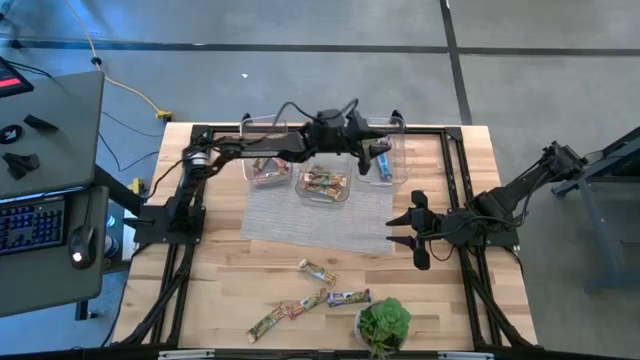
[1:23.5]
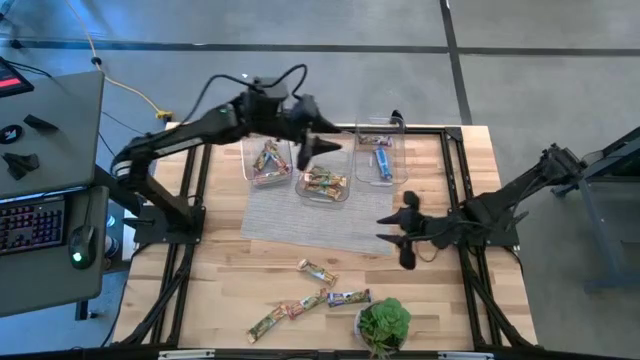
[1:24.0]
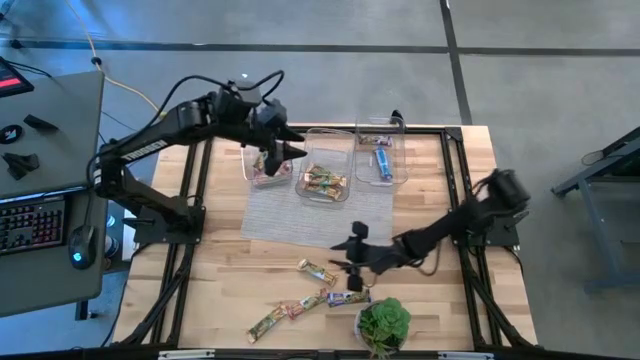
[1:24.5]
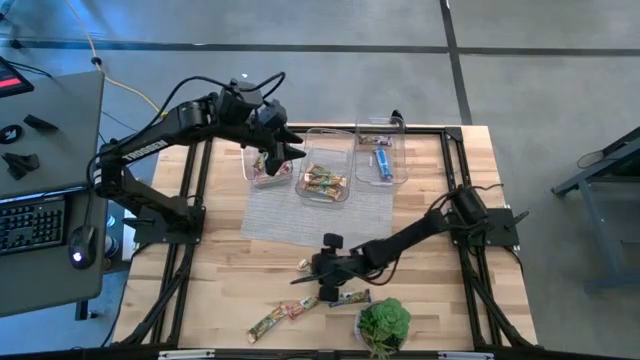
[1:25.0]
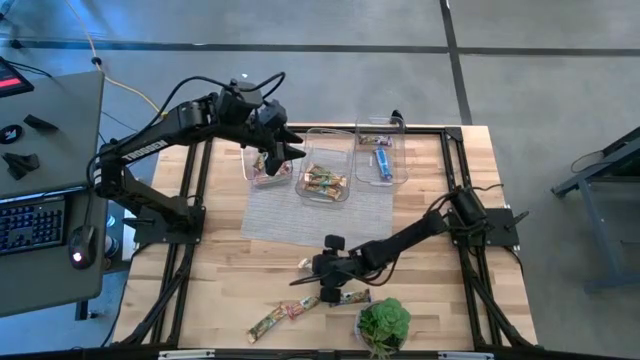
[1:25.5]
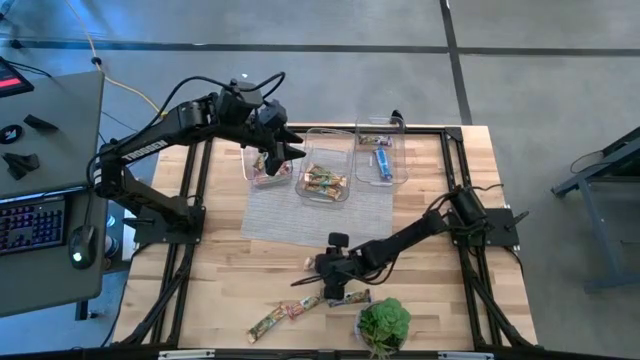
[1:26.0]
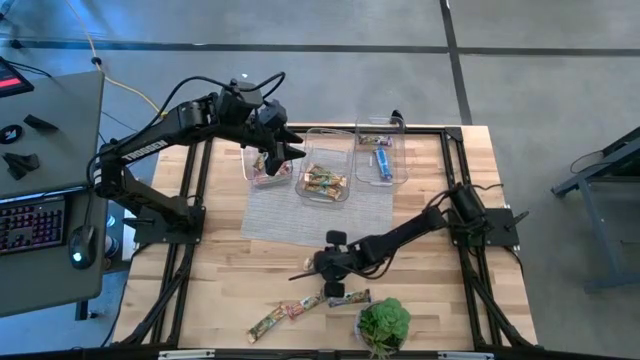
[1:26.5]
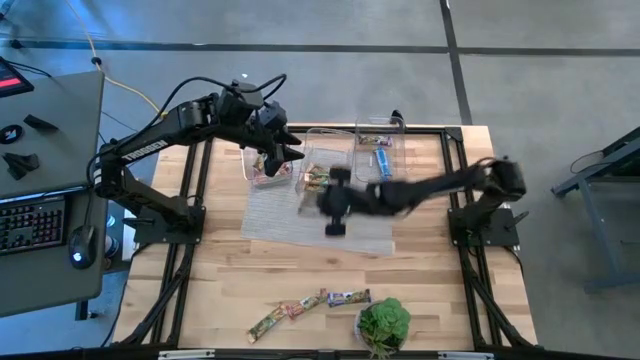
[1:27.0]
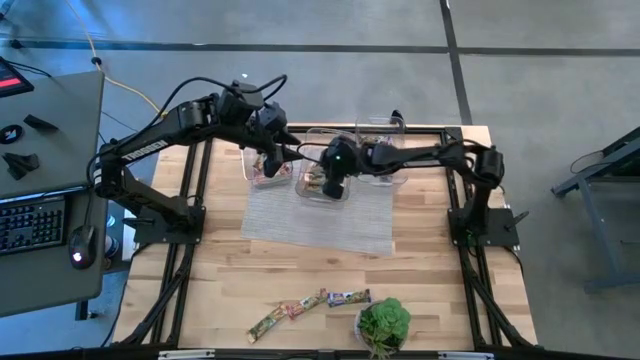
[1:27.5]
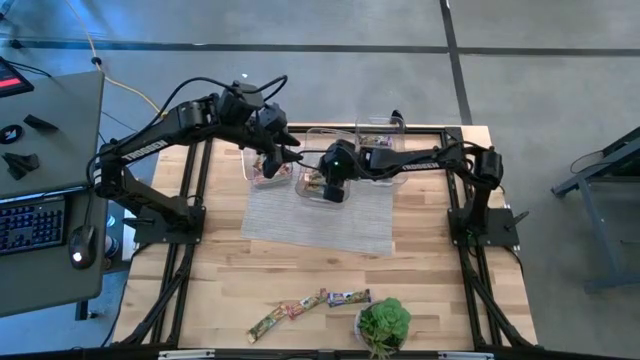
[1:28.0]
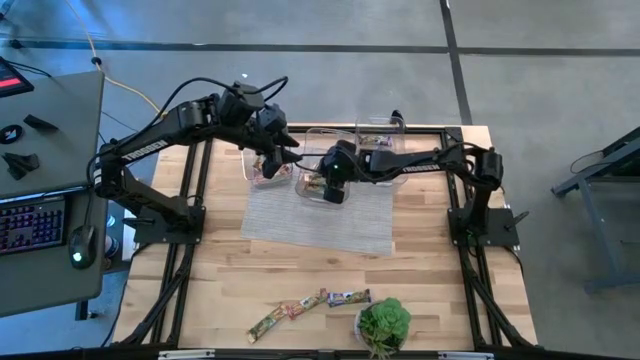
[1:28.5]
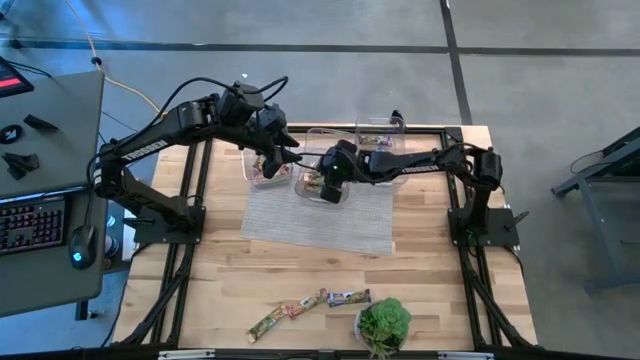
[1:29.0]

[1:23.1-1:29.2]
Task: Pick and place Granola Bars by type
Put the orange granola bar into the middle transparent bin

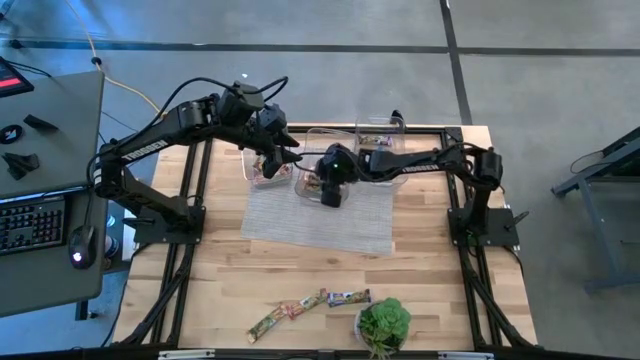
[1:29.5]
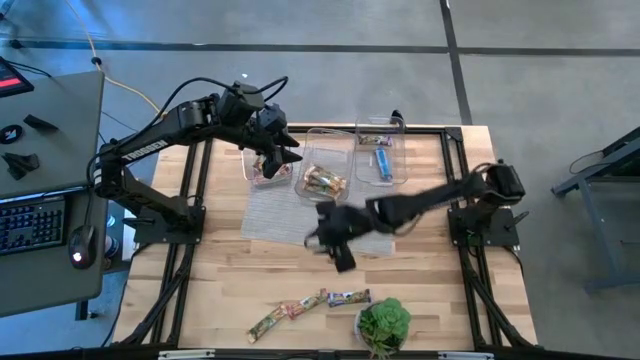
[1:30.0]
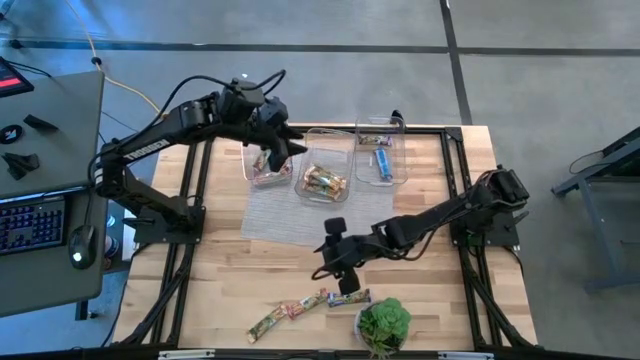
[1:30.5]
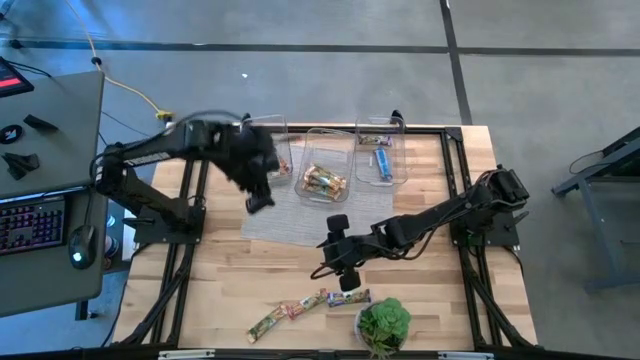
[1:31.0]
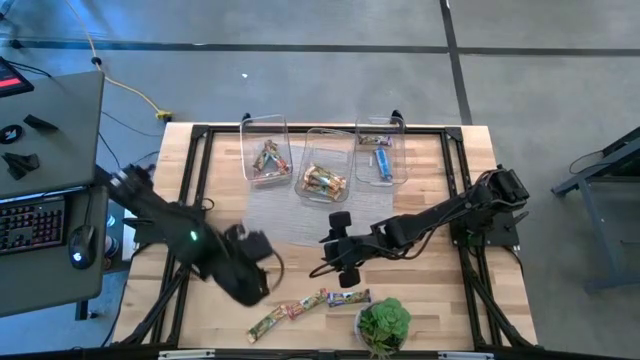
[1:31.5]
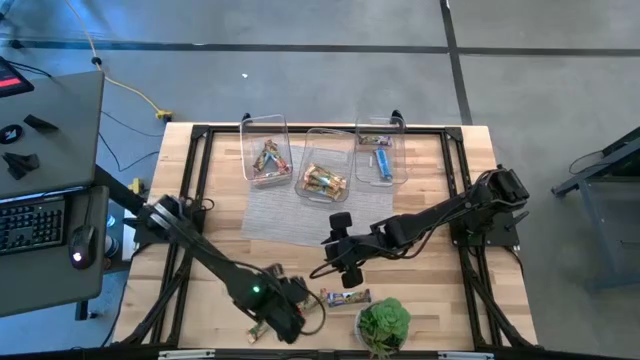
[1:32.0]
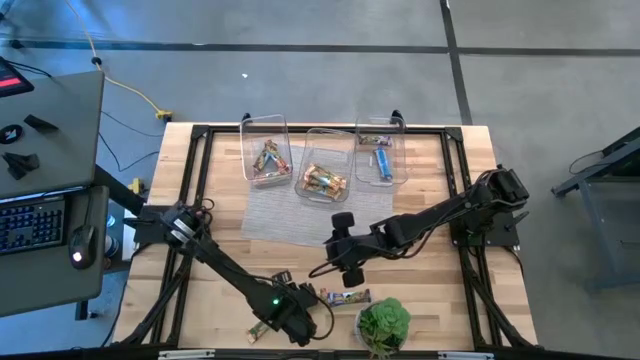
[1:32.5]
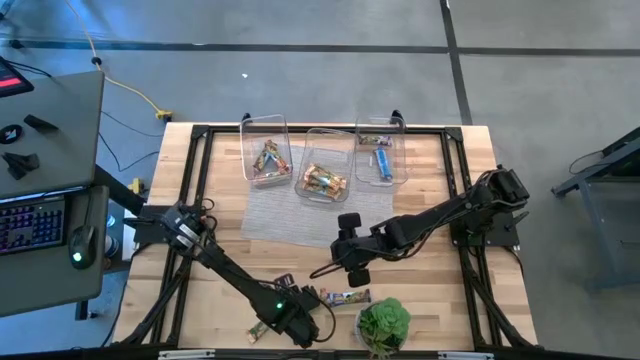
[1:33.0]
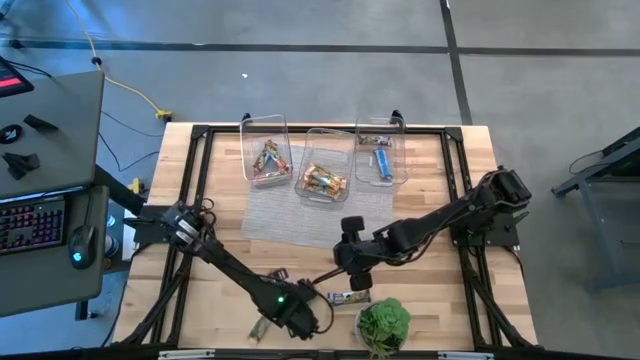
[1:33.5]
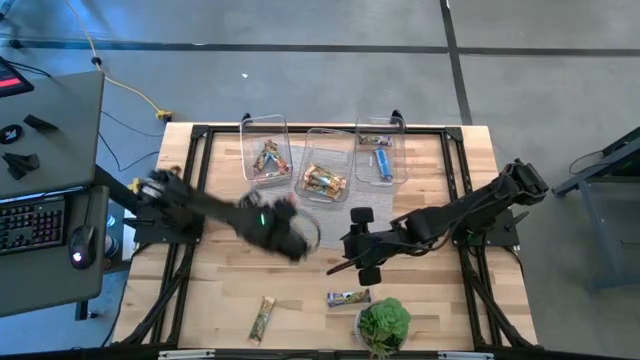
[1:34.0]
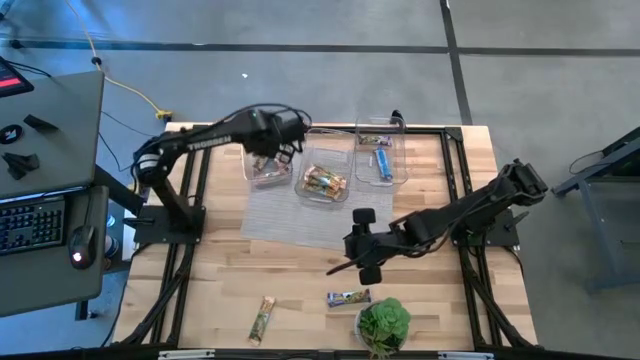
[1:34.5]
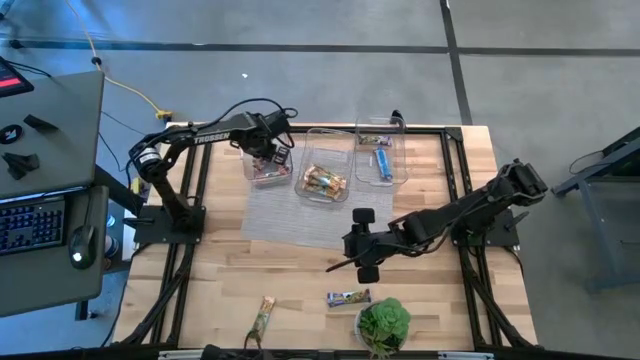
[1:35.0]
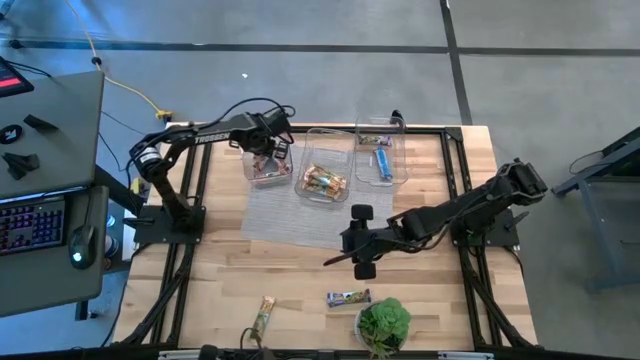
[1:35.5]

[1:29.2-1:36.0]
Put the red granola bar into the left transparent bin

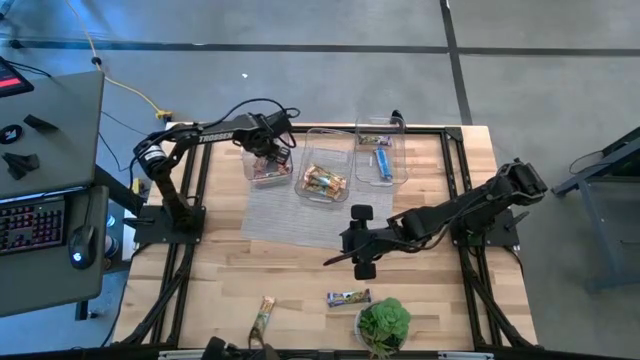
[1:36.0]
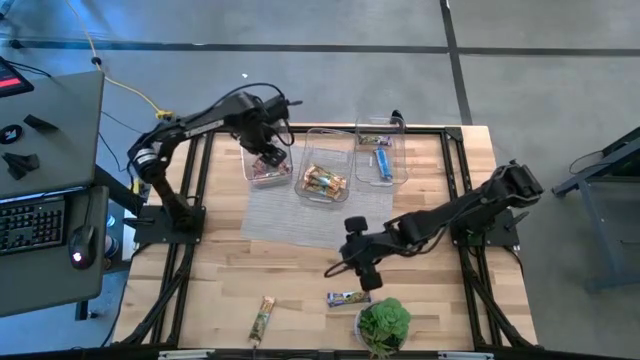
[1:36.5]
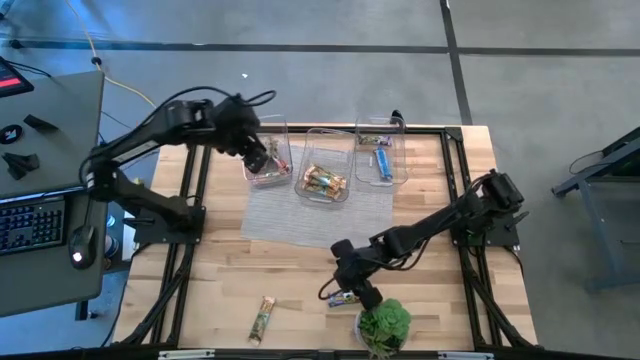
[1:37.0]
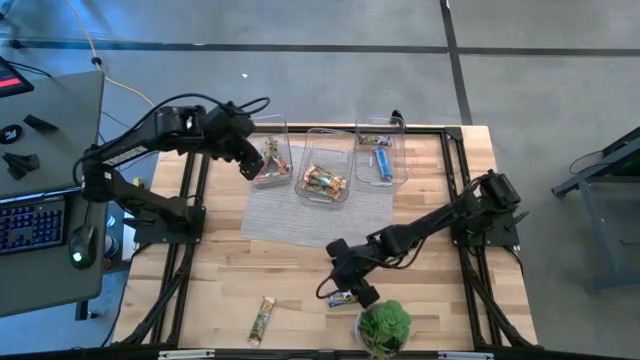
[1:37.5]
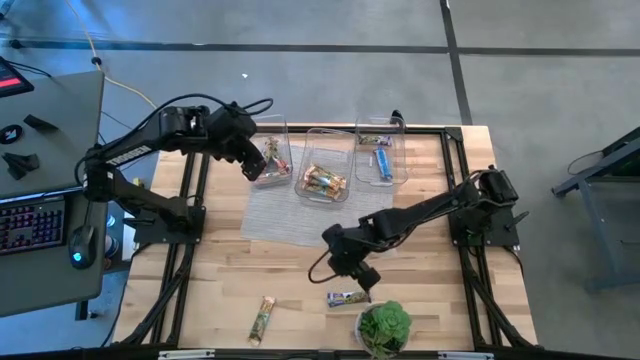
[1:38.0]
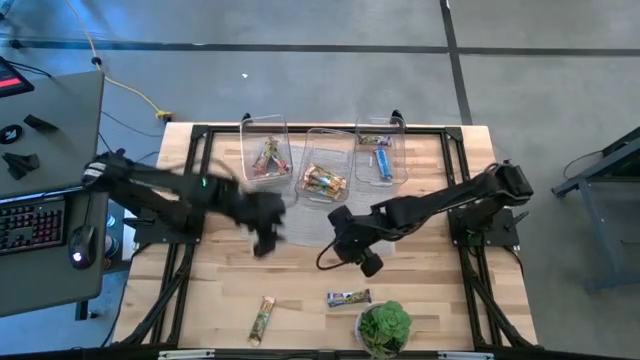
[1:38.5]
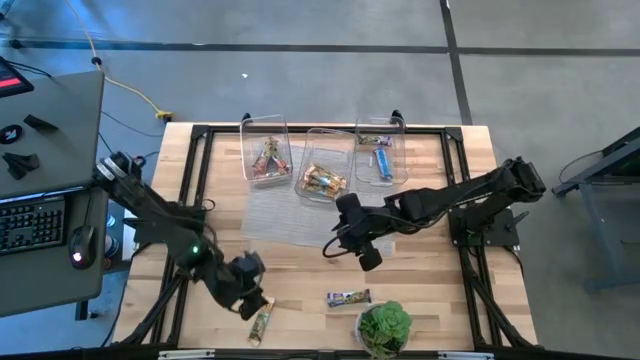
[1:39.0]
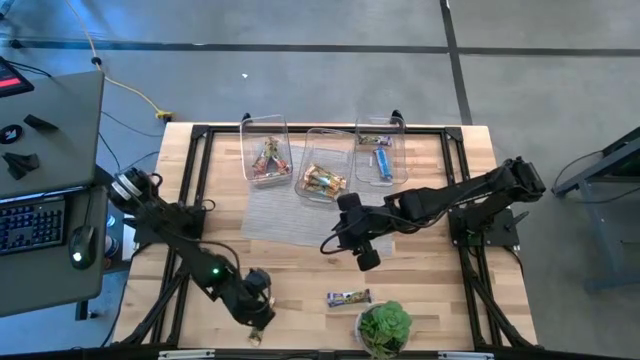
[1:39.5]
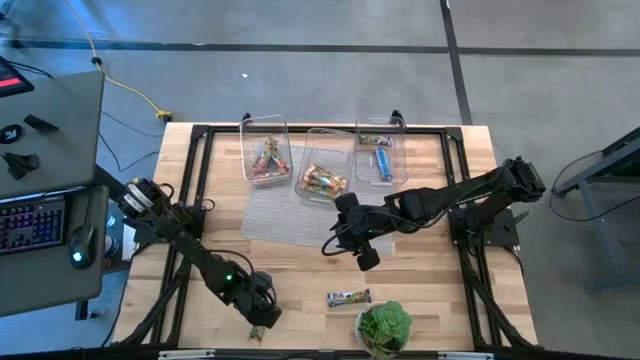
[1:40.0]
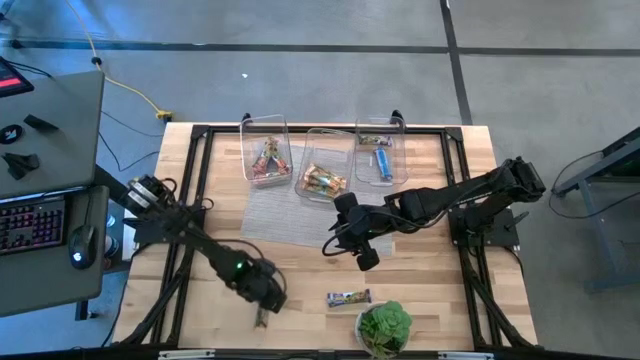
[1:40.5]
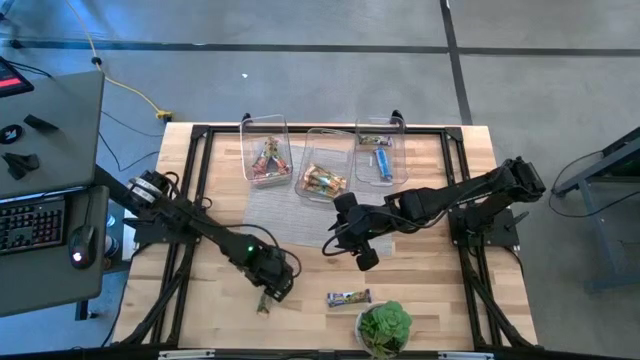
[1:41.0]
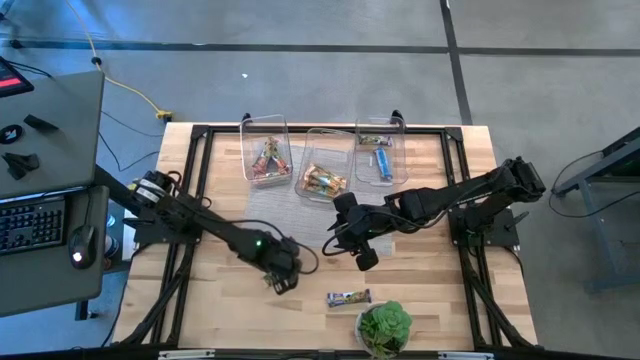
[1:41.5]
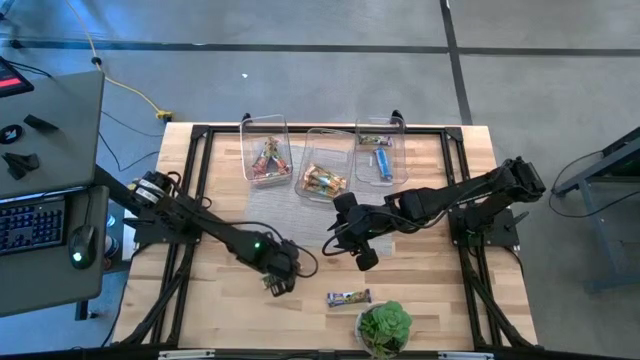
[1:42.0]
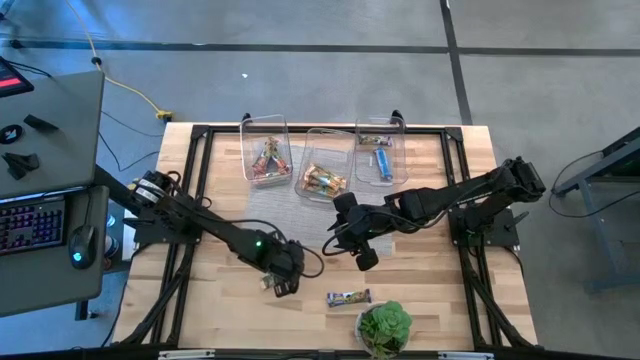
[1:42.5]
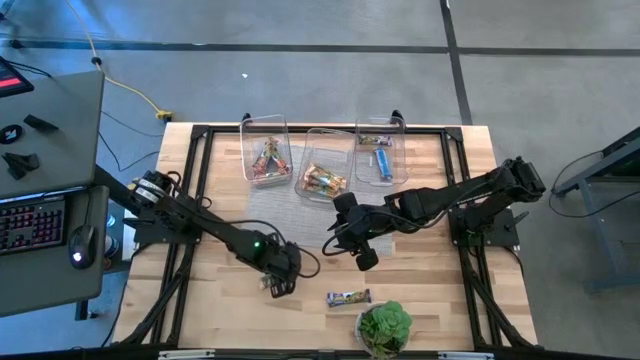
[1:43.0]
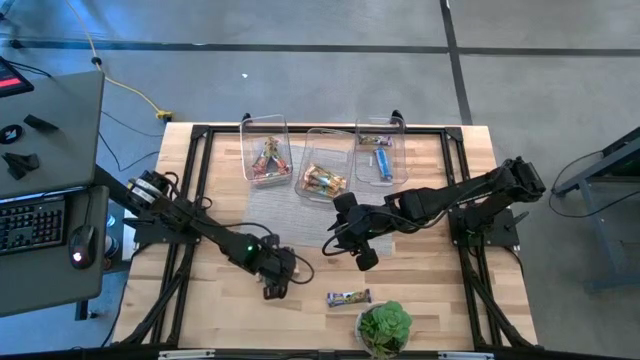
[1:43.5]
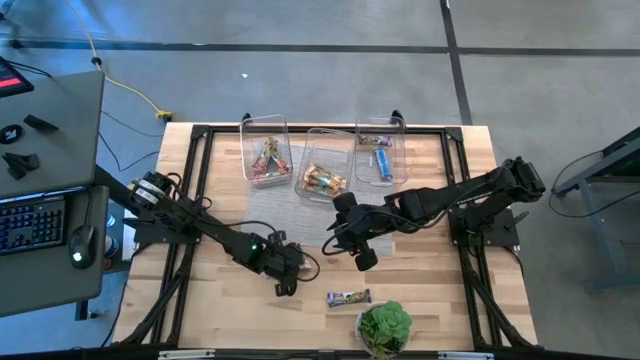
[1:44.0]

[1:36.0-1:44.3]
Put the orange granola bar into the middle transparent bin

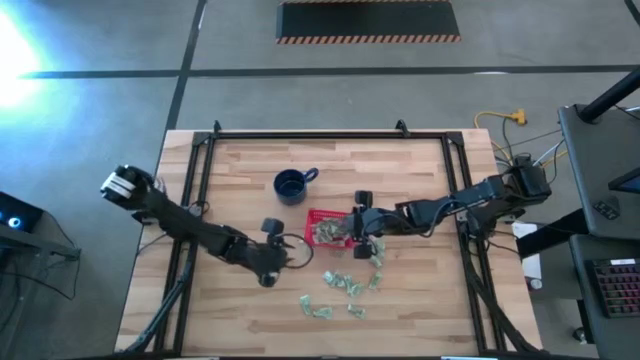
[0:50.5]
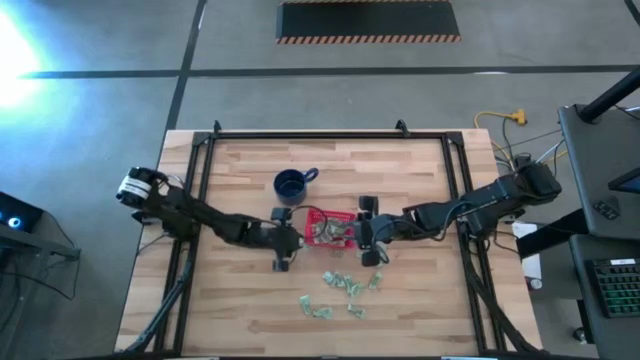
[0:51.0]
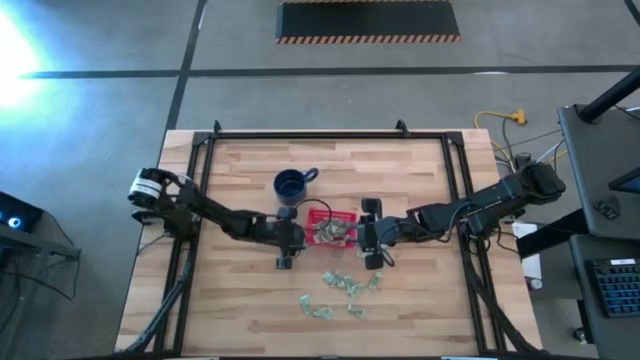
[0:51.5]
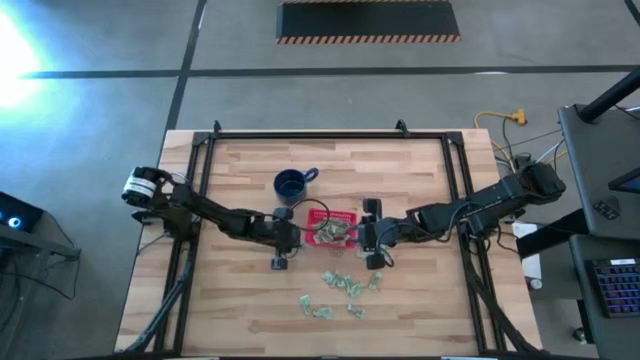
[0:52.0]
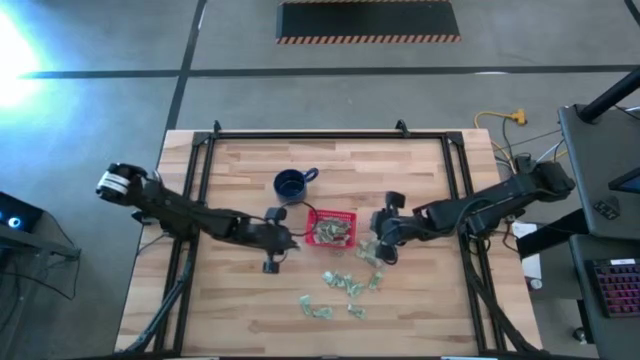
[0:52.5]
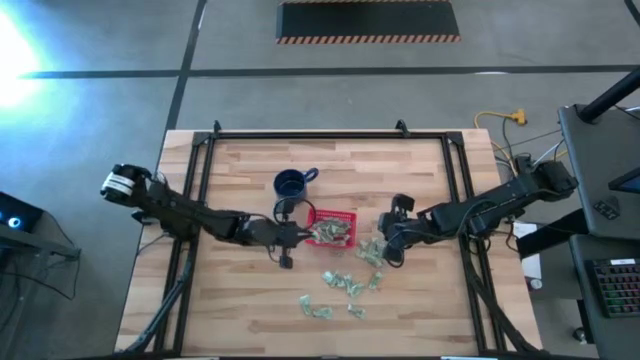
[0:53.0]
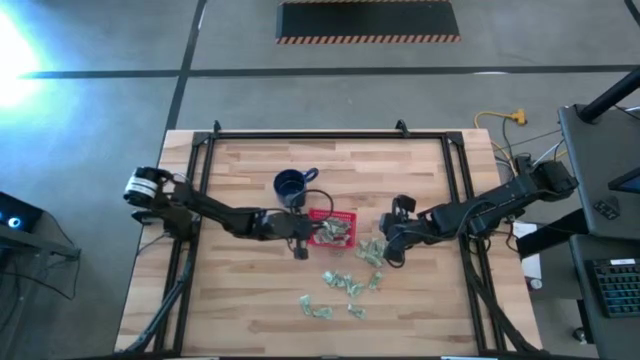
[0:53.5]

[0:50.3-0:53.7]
Task: Pick and place Stevia / Truvia into bins
Put the white stevia packet into the red basket
